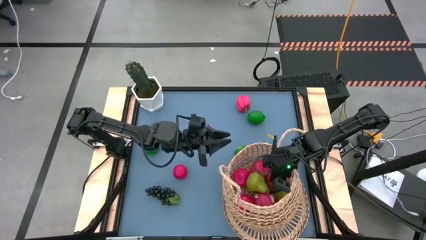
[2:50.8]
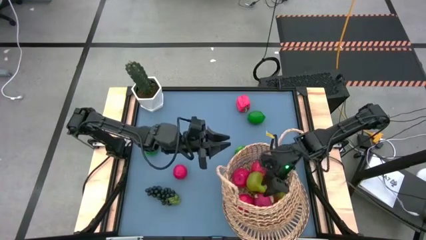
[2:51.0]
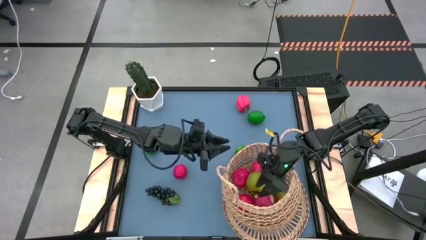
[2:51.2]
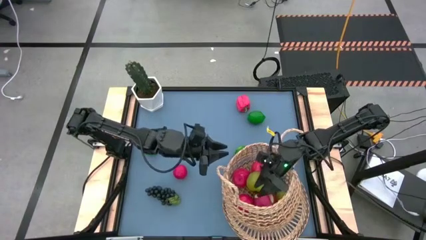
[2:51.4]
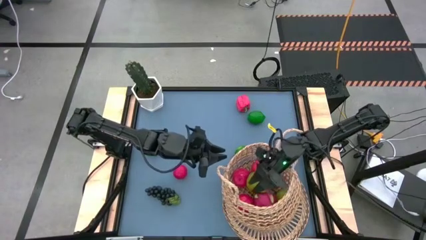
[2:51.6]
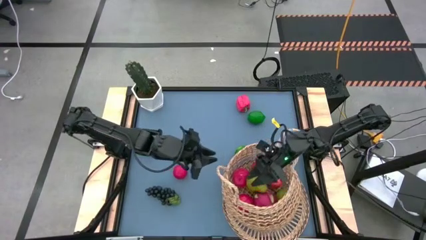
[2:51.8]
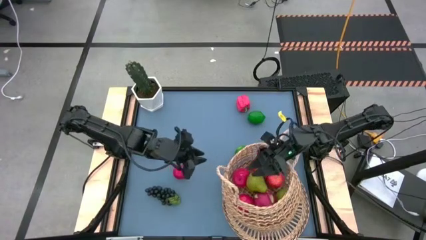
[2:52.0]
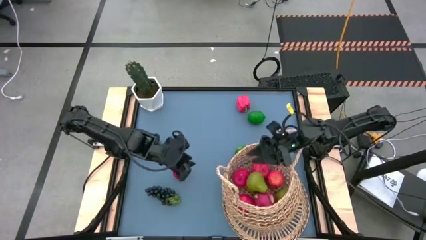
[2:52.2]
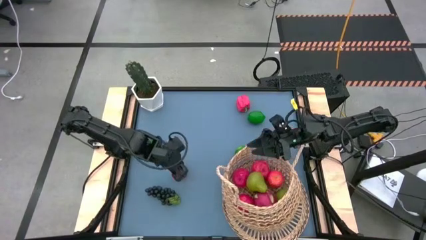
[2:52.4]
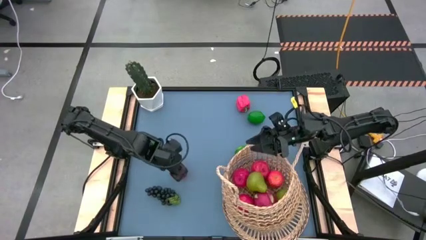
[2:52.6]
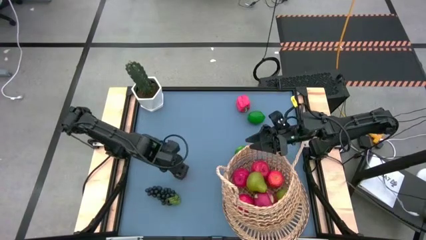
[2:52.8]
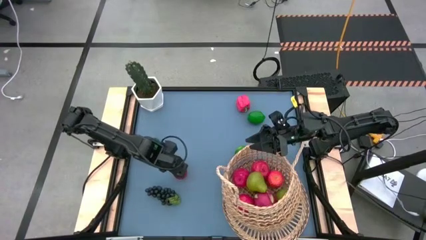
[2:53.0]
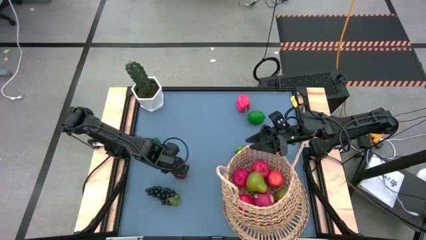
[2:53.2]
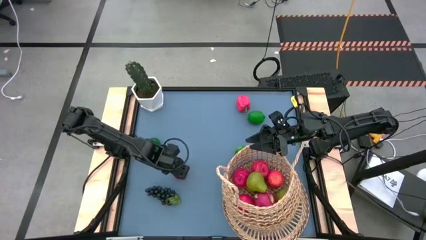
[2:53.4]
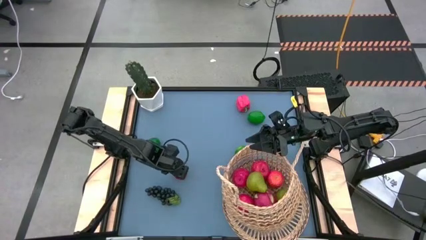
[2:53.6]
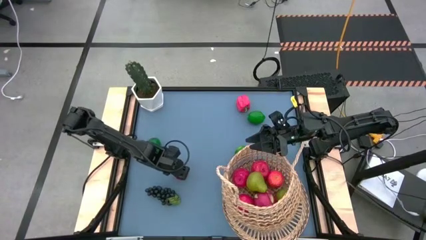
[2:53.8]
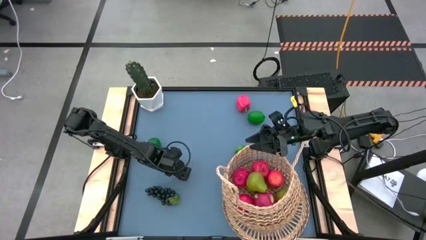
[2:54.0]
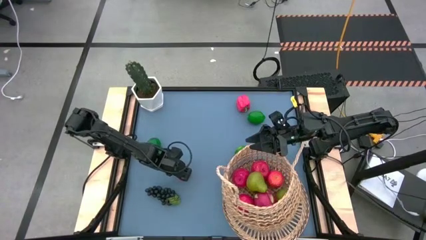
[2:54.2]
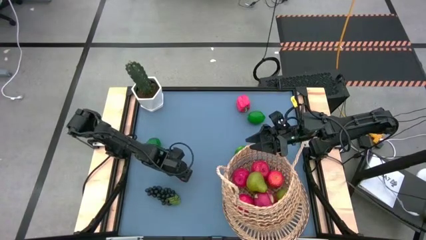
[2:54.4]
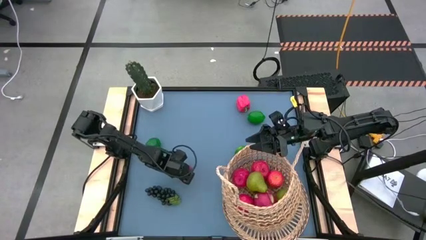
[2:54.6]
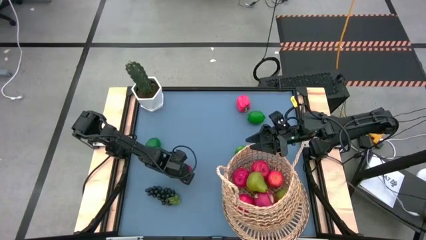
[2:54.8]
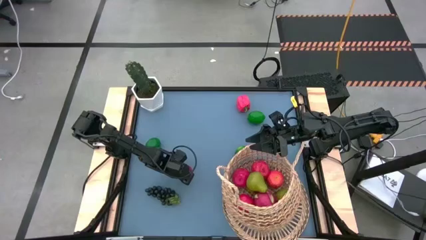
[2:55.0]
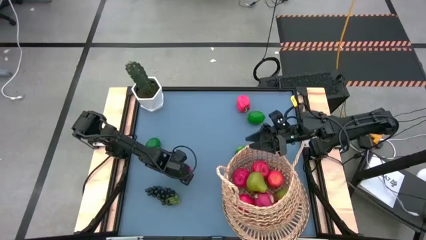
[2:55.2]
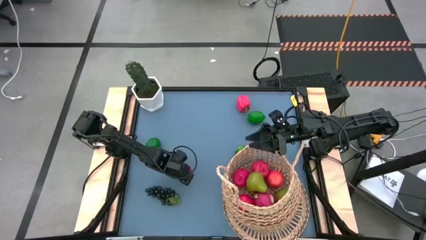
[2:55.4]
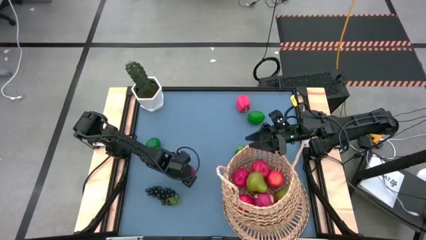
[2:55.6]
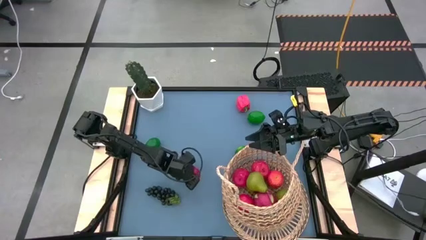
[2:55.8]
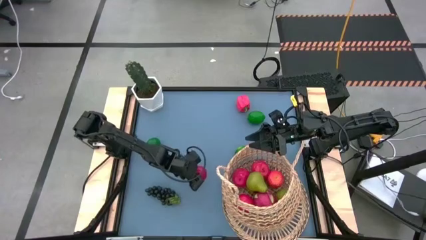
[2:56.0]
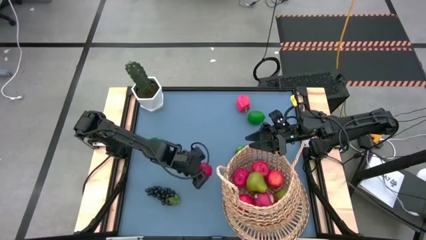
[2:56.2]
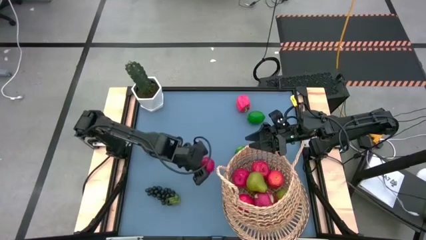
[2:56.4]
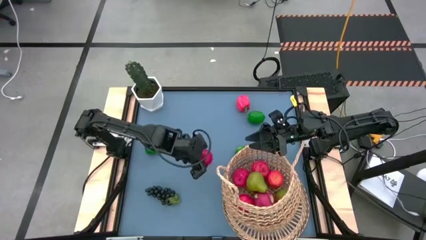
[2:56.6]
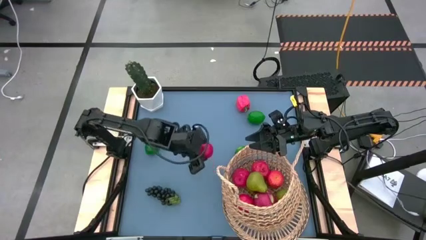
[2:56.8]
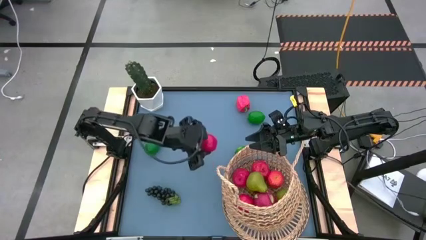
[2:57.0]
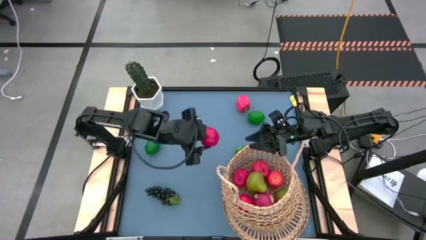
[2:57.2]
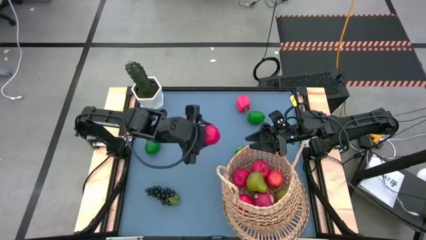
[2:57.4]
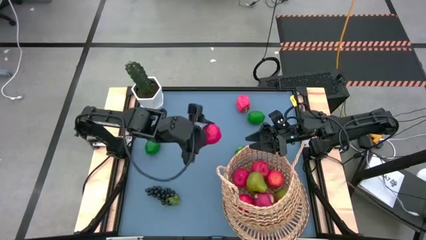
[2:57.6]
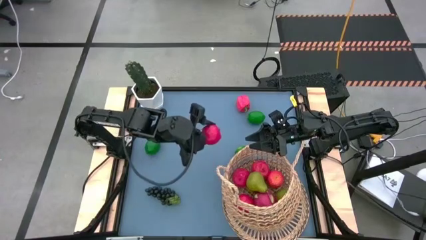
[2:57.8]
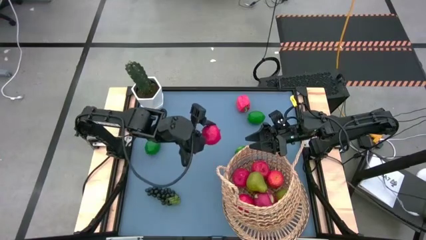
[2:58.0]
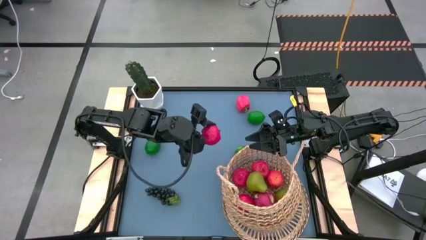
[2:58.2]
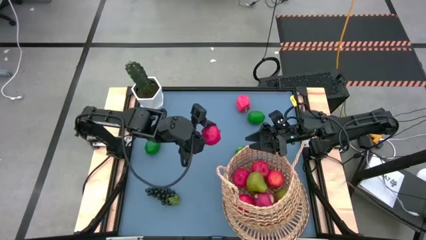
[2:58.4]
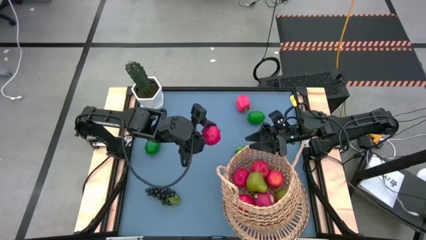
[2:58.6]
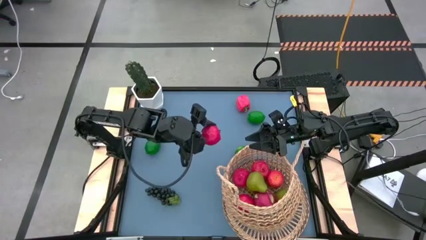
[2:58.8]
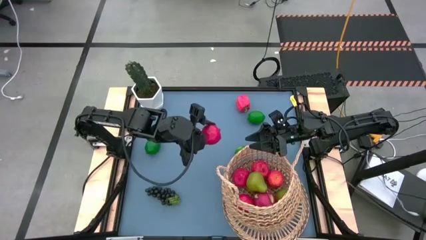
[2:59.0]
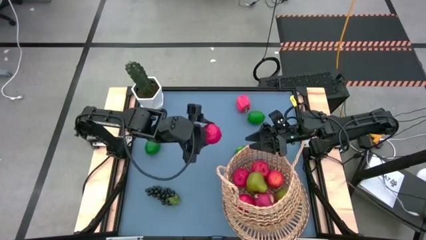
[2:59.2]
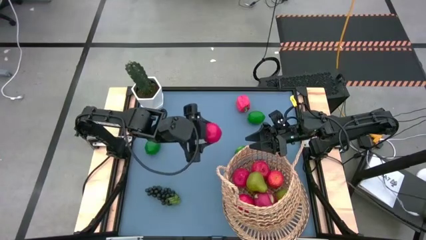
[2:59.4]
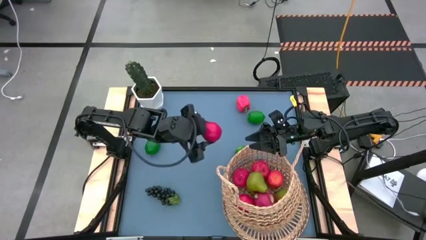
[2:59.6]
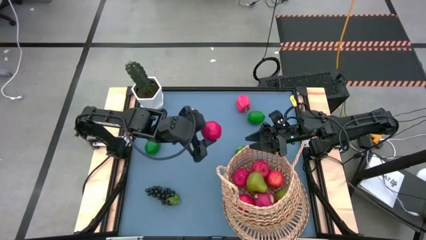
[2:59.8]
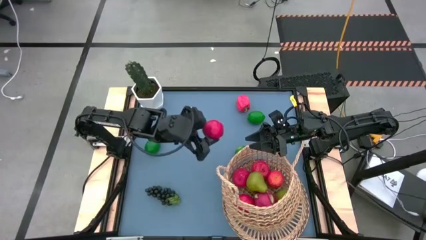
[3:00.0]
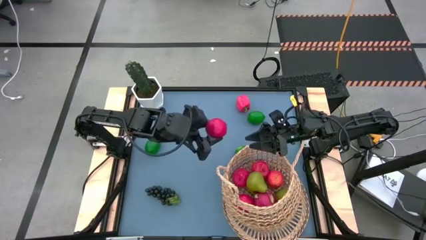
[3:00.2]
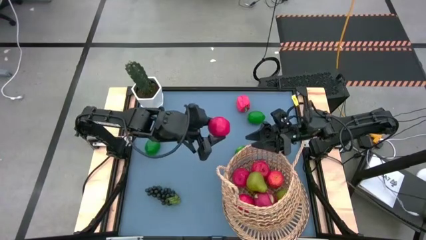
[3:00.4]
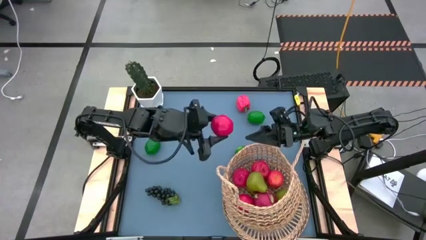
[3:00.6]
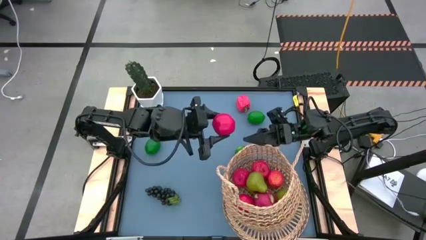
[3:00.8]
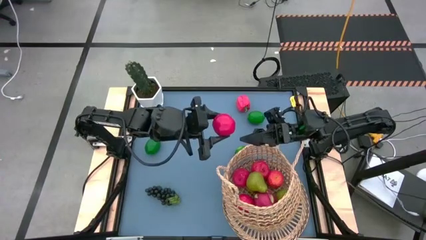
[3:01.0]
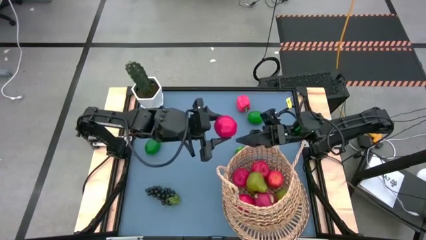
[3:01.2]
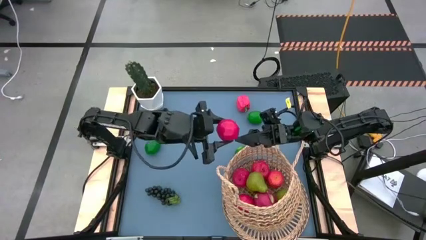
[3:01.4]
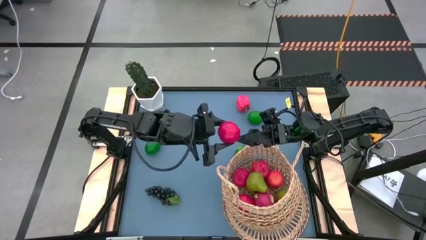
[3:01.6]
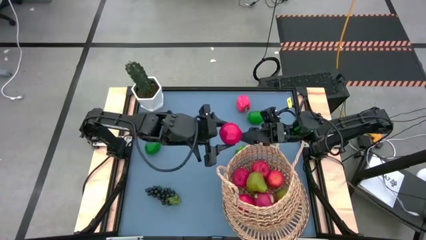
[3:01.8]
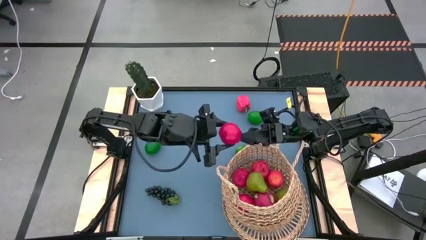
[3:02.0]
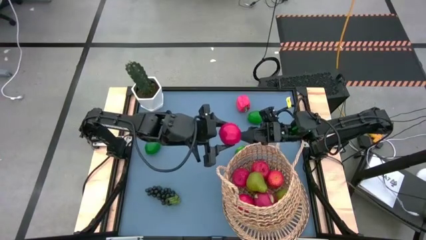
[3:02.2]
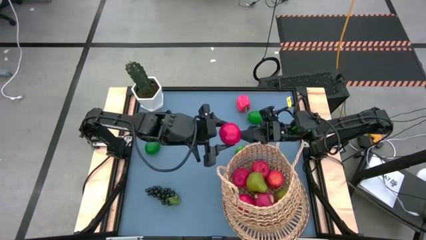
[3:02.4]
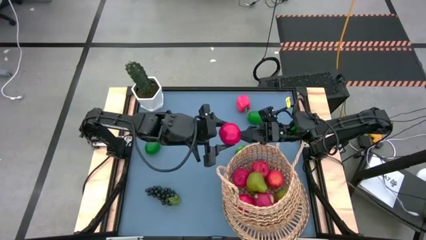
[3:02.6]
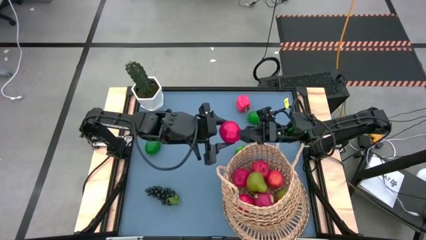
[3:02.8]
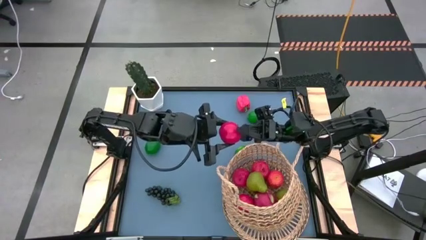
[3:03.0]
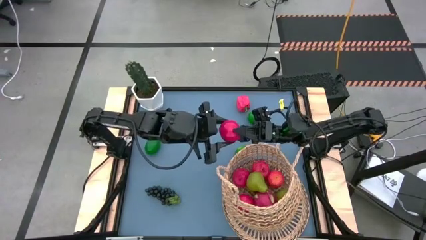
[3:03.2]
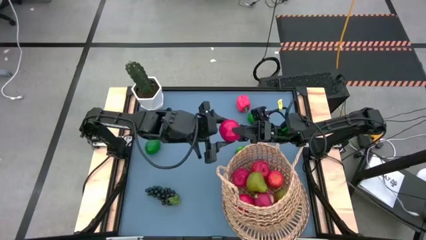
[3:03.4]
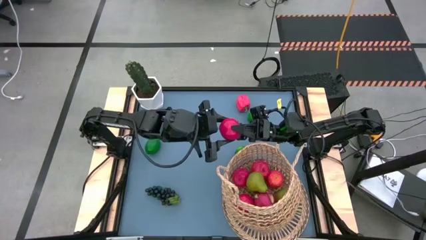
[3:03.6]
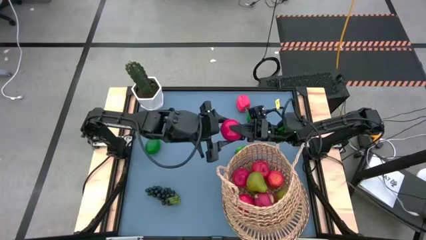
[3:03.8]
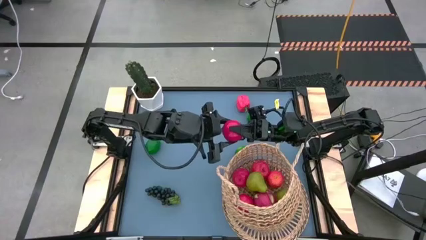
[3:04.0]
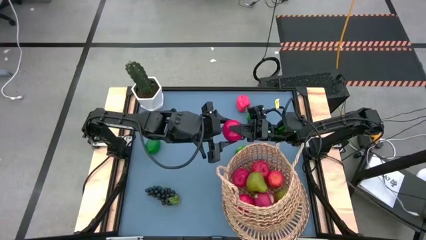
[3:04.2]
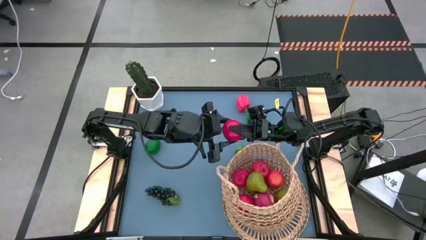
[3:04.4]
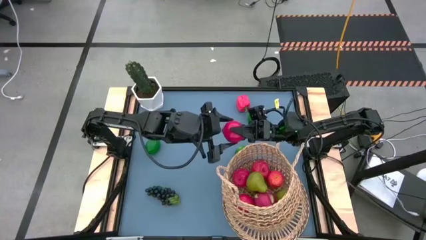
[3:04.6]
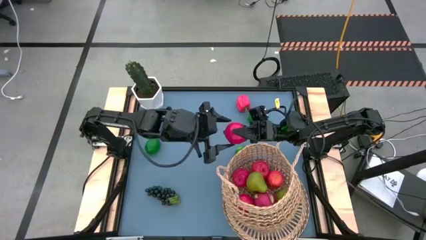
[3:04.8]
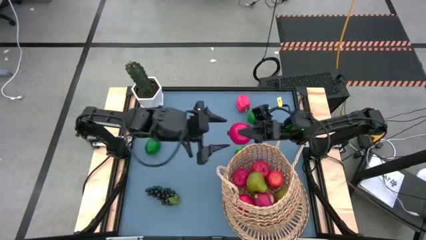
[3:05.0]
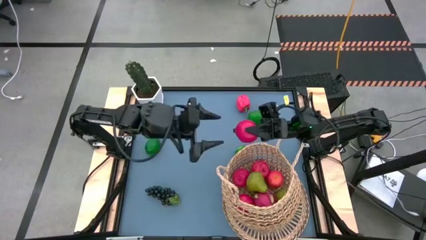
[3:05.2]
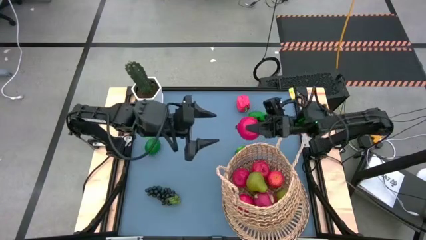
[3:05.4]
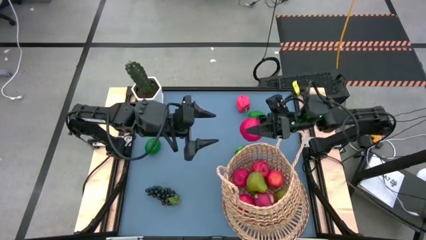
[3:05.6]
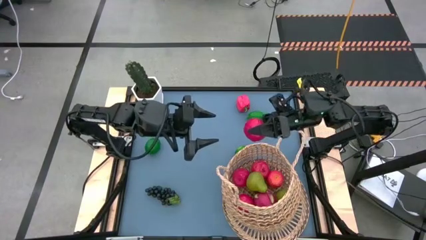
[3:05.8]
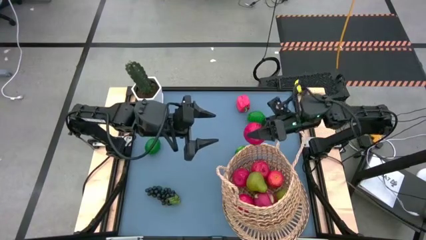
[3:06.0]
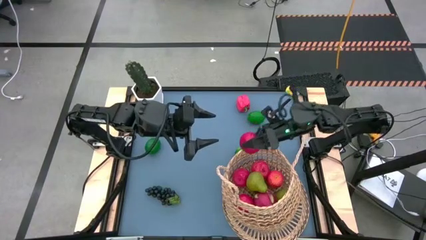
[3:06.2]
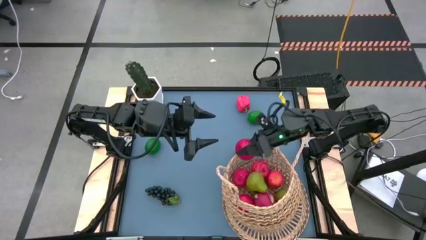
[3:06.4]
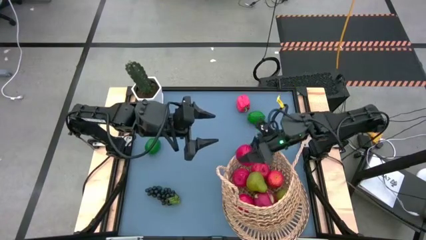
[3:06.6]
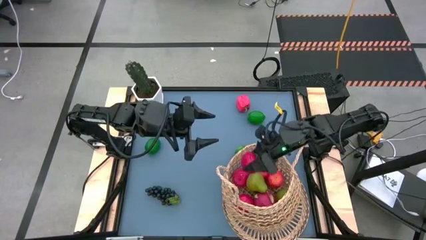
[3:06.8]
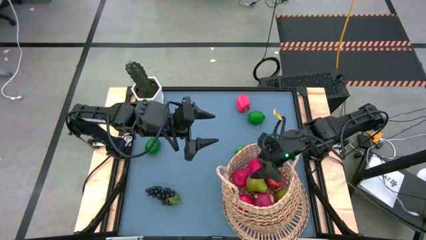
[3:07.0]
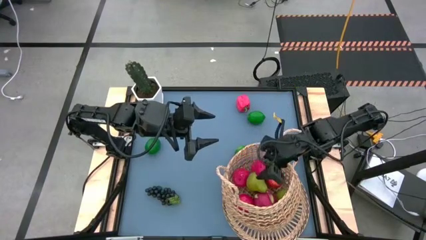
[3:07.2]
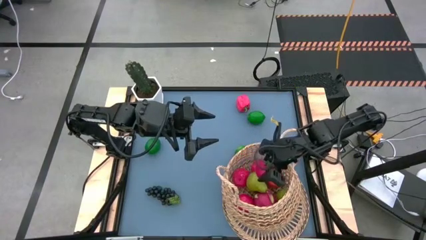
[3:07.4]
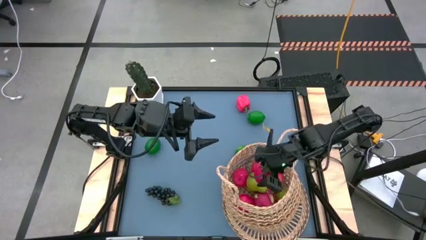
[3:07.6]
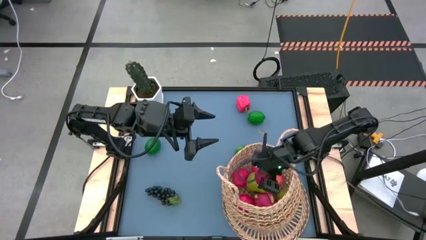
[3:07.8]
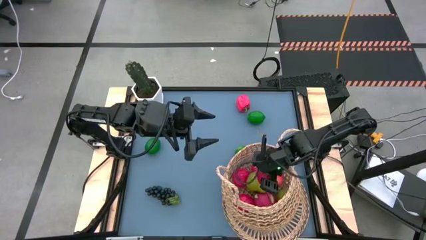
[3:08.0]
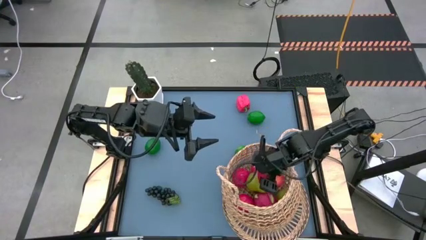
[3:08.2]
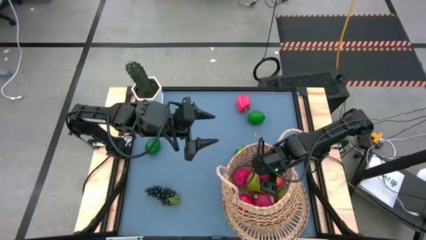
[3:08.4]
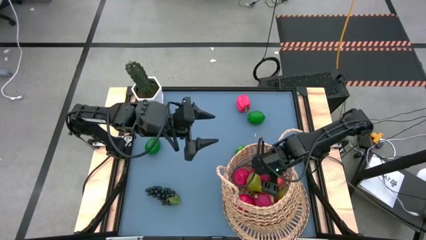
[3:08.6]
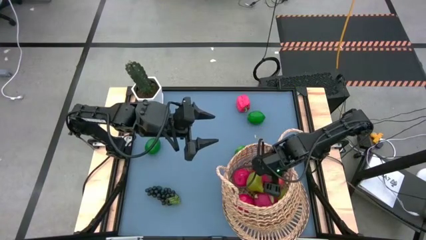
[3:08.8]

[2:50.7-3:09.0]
Task: Build produce basket
Put the red tomato into the brown basket
